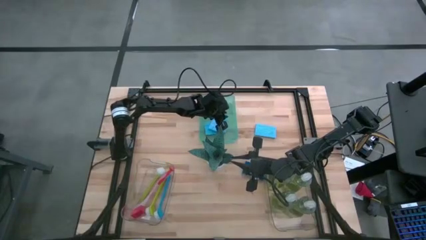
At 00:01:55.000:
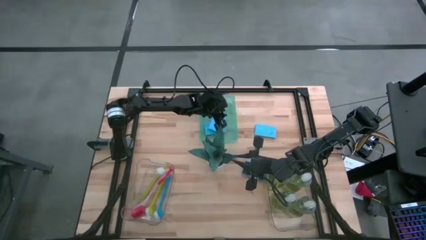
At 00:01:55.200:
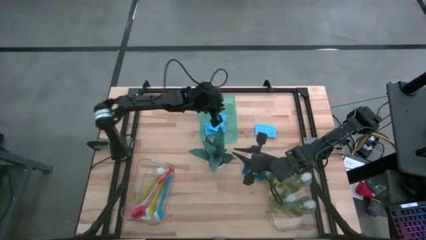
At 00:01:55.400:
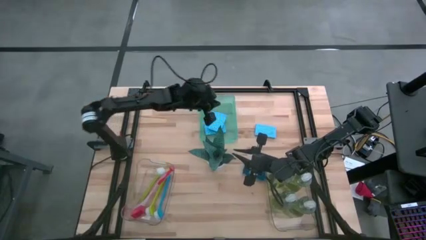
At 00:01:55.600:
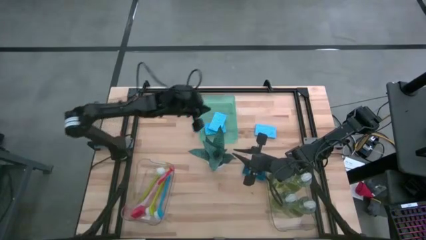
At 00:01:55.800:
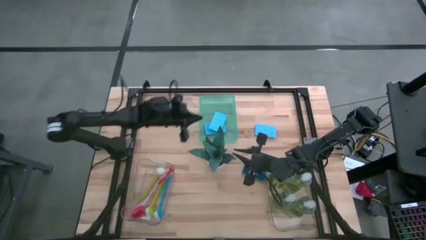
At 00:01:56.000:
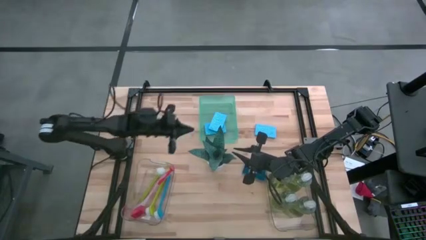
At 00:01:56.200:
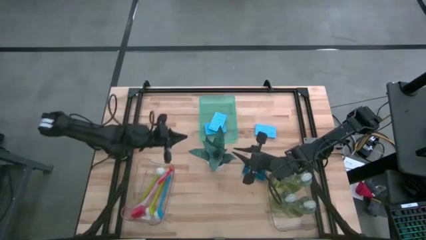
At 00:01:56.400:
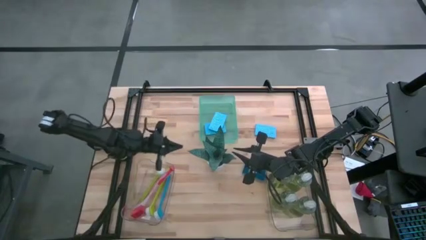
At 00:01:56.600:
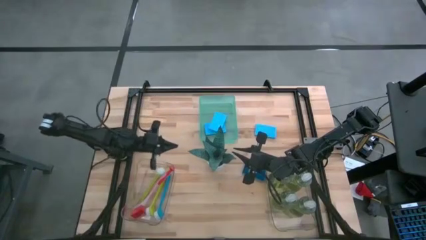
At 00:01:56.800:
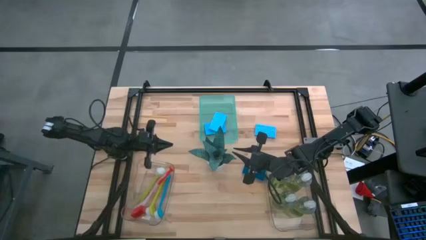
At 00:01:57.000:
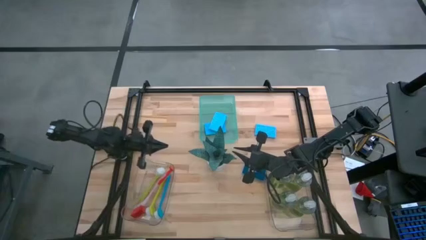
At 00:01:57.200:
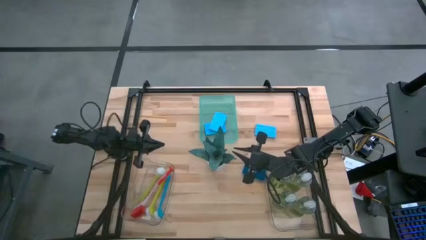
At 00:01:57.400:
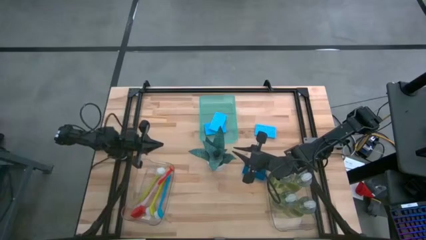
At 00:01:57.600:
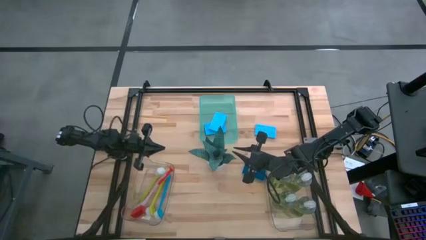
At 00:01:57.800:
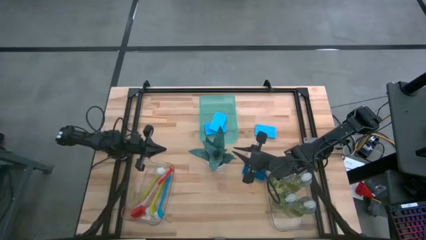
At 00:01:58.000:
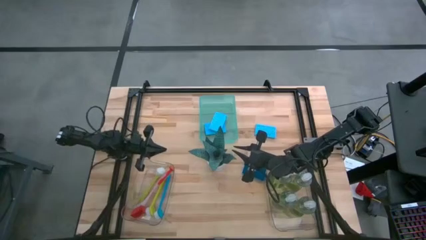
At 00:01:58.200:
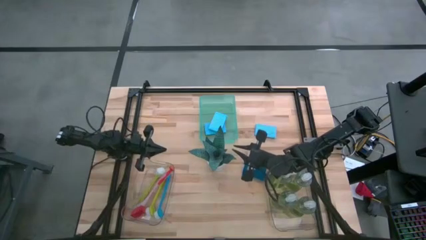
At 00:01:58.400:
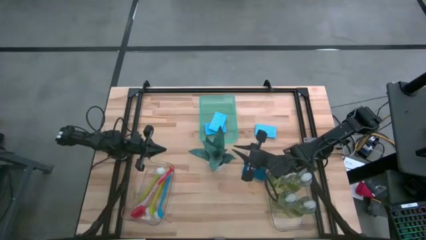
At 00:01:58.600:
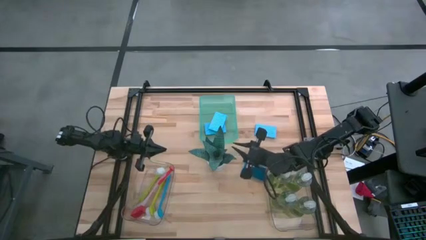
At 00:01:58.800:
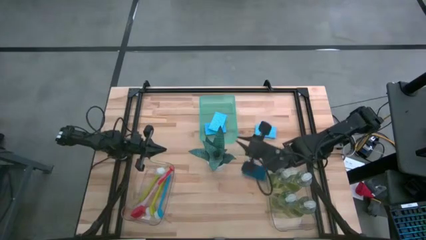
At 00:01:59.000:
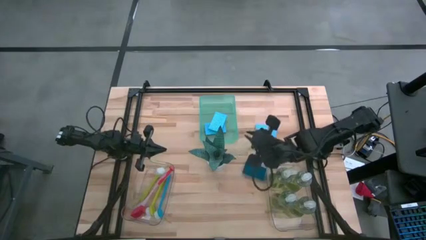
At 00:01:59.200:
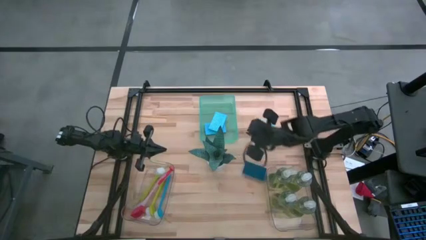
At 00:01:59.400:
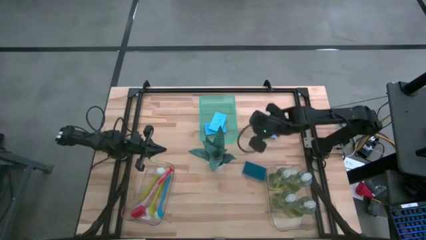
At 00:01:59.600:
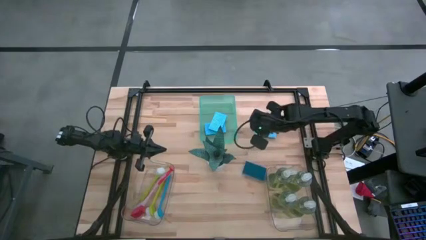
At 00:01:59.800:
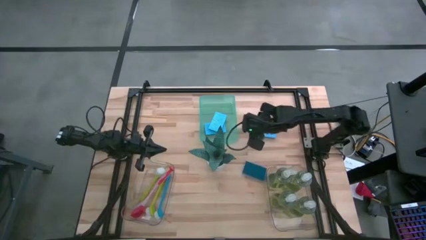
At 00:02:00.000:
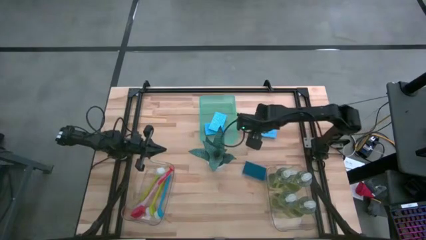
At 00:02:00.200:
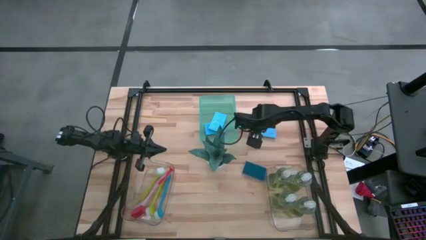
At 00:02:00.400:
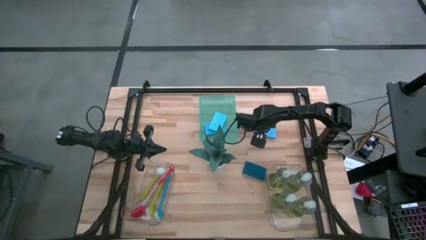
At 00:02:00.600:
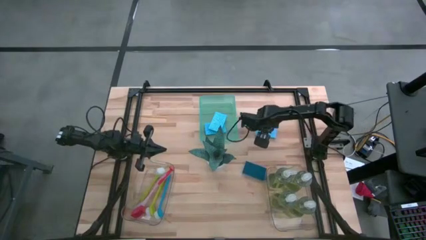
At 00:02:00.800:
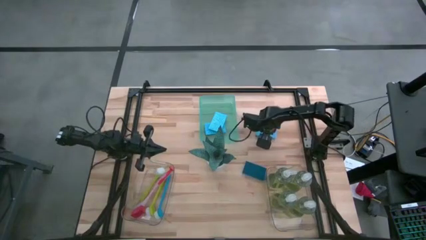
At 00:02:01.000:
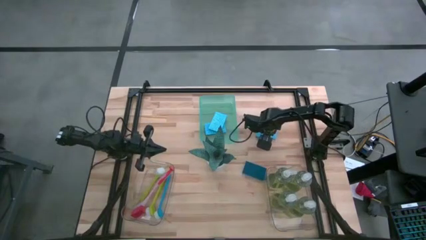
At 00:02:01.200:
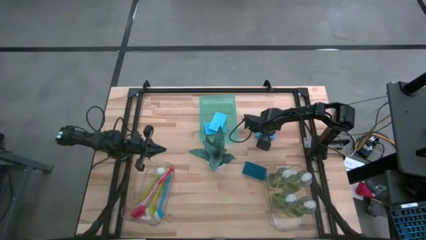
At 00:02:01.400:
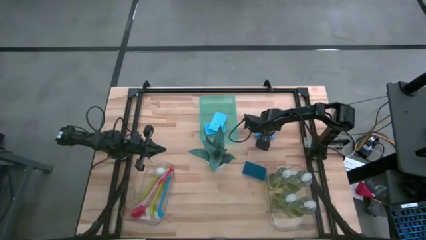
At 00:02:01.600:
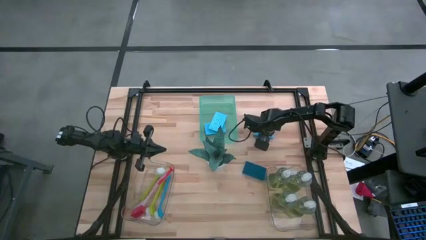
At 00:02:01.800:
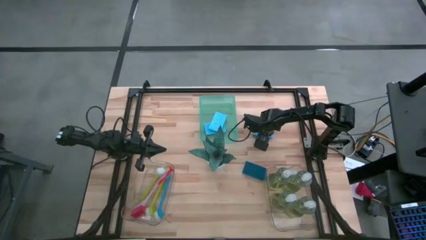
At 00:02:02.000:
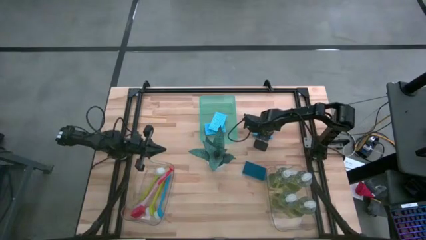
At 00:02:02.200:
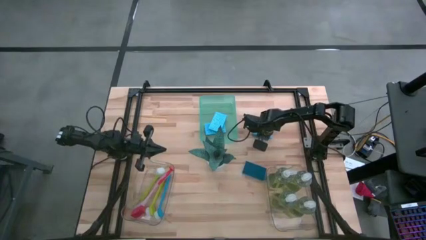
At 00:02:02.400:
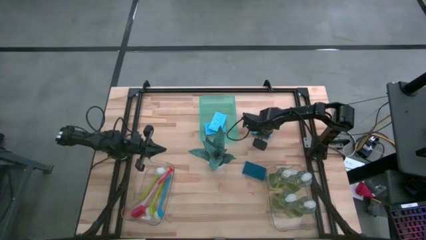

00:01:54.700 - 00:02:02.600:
Task: Pick & Place Kitchen Sink Supplies
Put the blue sponge into the green transparent bin

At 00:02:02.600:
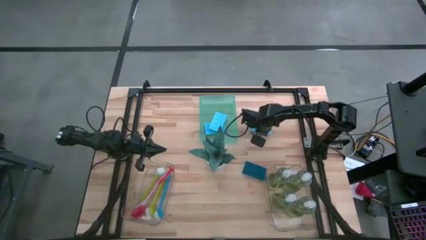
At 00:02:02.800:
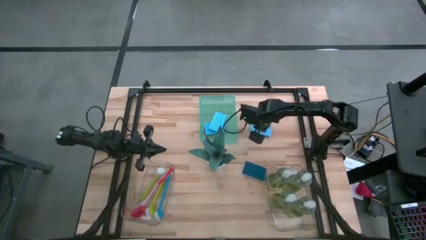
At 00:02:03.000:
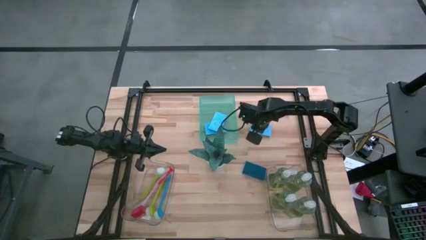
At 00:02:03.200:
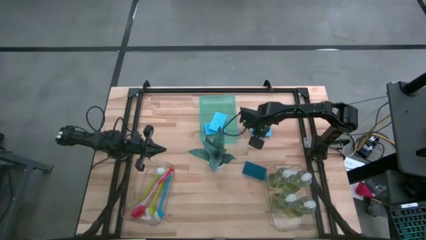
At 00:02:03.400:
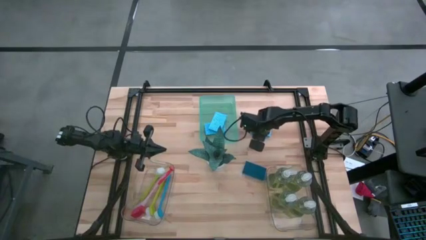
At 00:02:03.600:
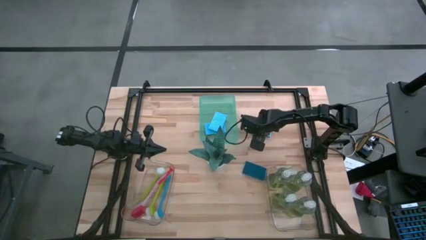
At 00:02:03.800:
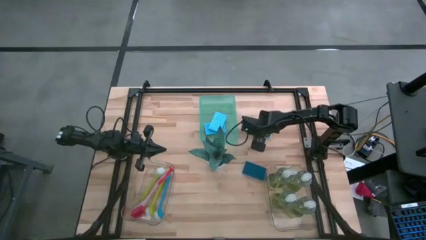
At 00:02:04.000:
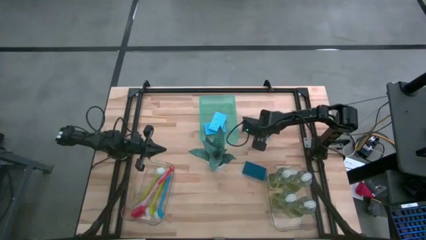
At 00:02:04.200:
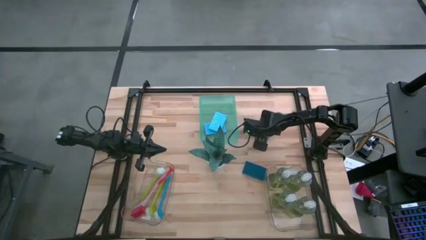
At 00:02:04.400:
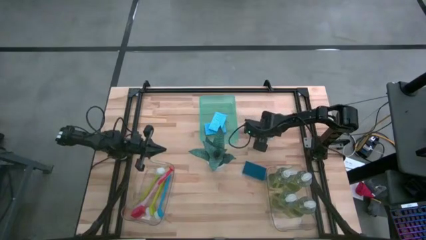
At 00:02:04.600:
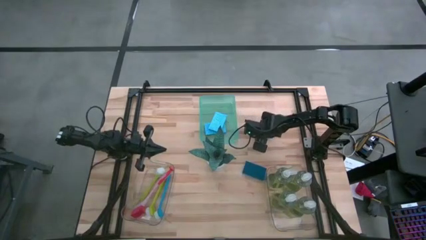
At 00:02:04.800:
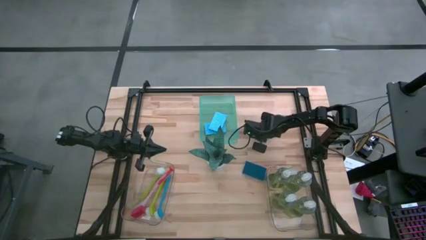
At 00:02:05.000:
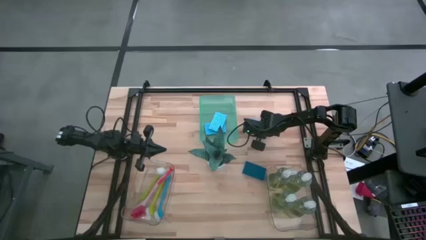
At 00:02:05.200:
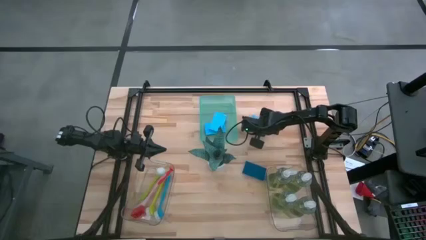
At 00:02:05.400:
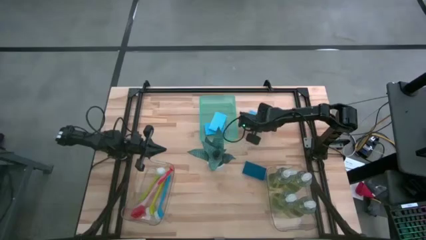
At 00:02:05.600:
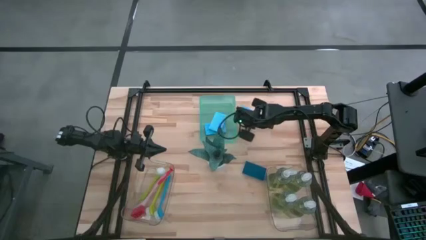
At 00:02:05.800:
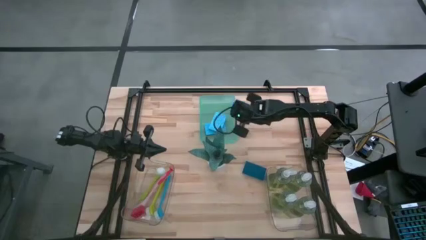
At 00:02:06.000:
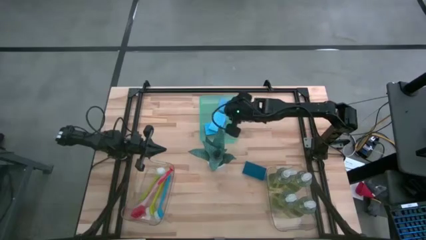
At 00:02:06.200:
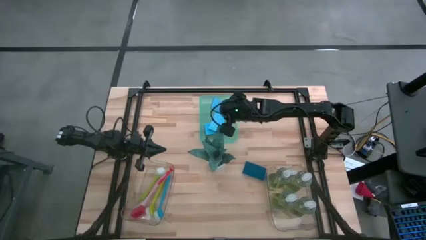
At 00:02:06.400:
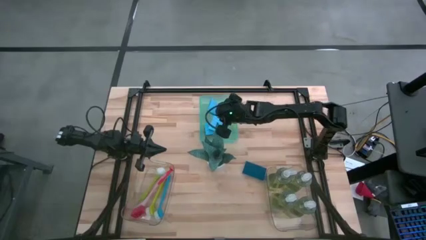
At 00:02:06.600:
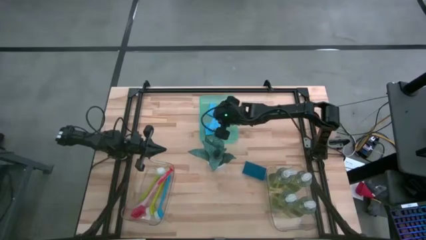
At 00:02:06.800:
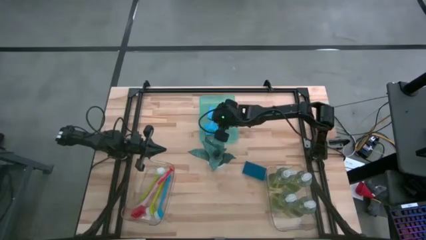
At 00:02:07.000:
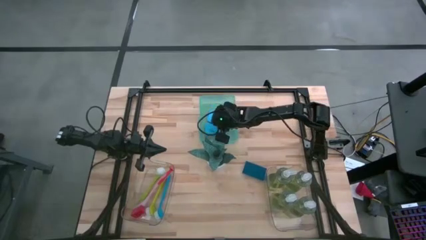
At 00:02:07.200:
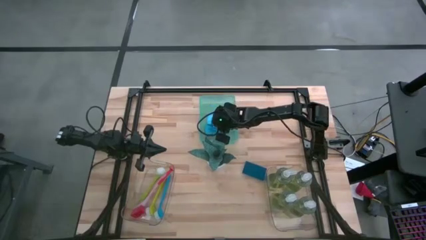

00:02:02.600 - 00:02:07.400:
Put the blue sponge into the green transparent bin

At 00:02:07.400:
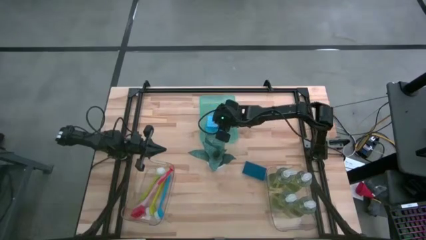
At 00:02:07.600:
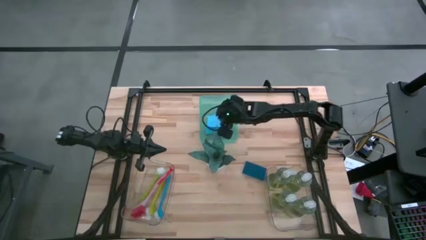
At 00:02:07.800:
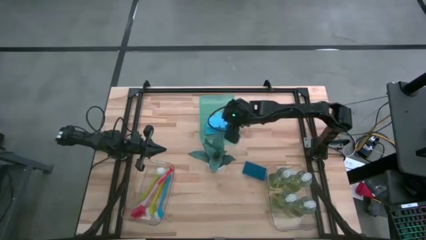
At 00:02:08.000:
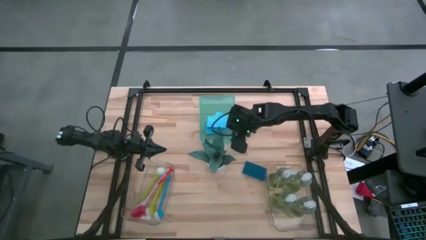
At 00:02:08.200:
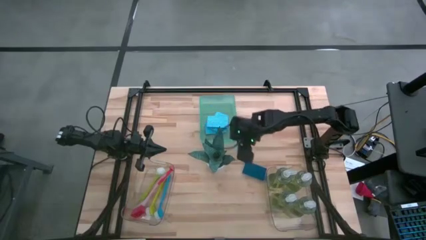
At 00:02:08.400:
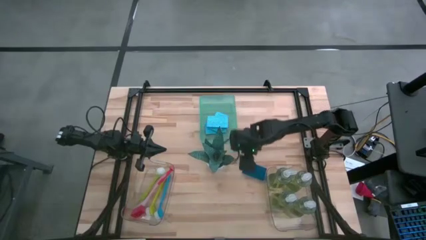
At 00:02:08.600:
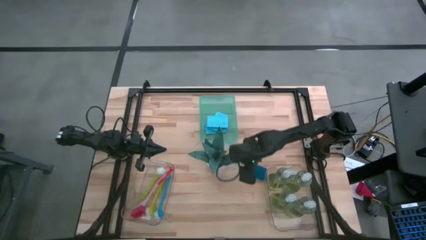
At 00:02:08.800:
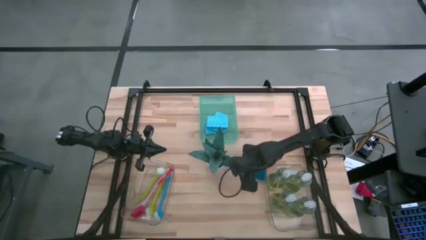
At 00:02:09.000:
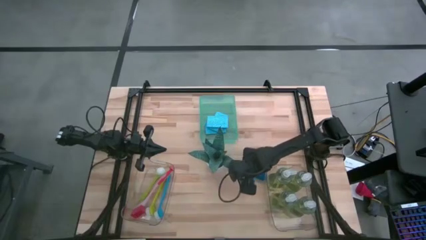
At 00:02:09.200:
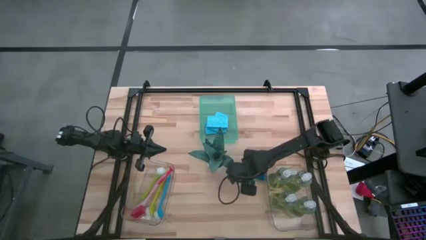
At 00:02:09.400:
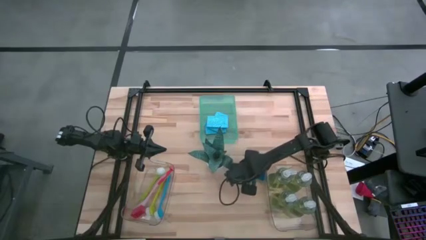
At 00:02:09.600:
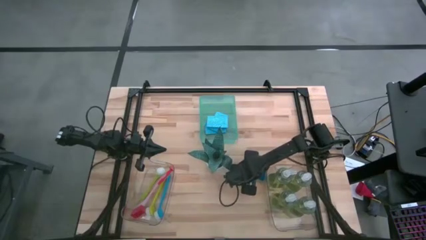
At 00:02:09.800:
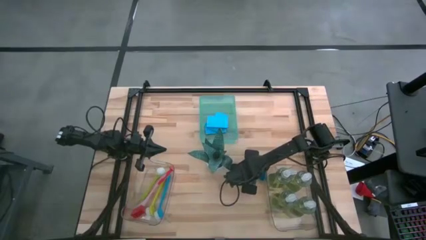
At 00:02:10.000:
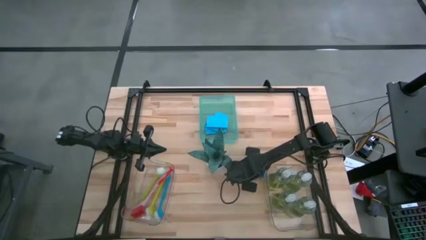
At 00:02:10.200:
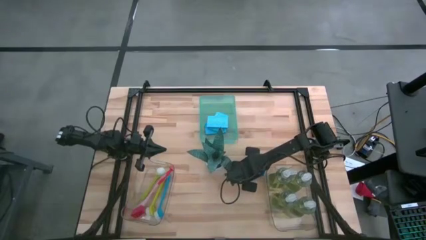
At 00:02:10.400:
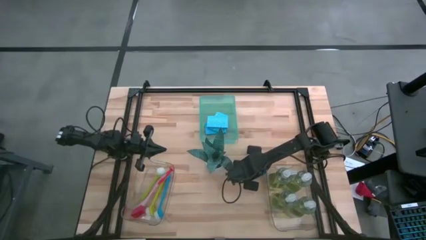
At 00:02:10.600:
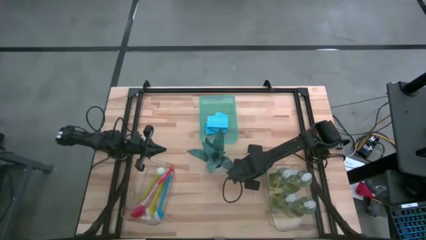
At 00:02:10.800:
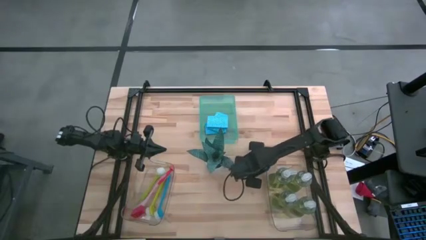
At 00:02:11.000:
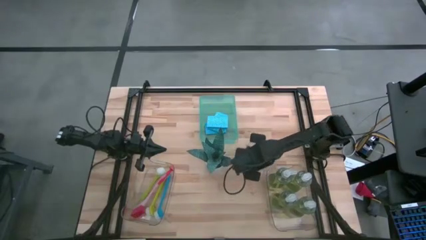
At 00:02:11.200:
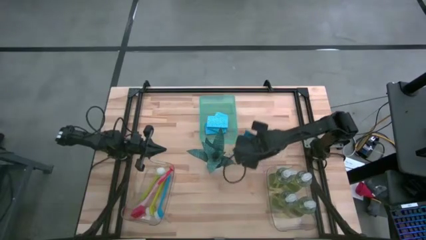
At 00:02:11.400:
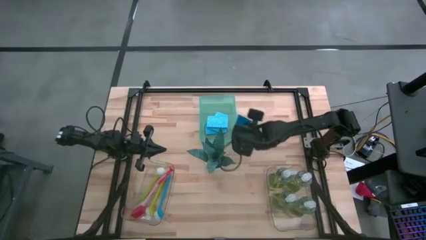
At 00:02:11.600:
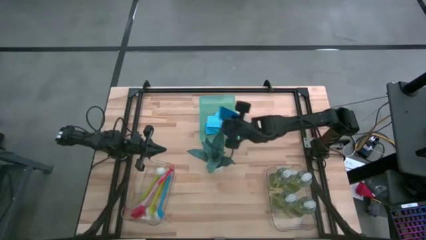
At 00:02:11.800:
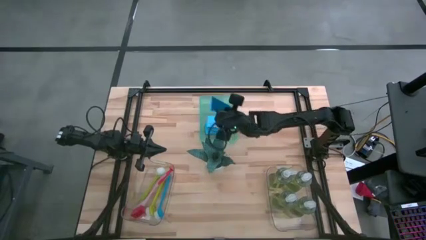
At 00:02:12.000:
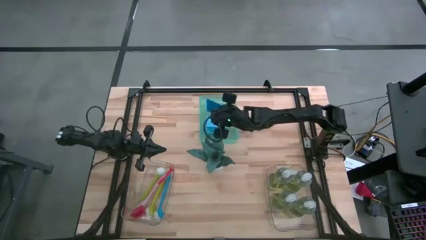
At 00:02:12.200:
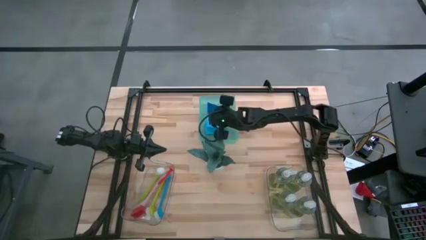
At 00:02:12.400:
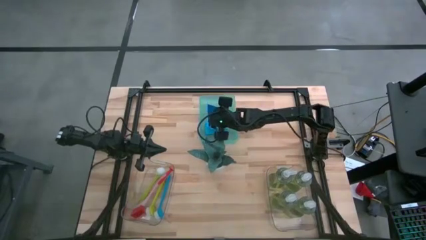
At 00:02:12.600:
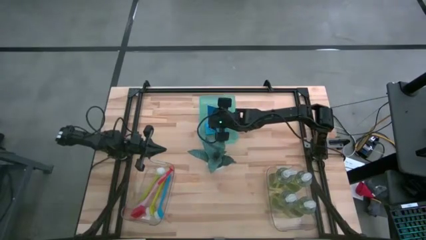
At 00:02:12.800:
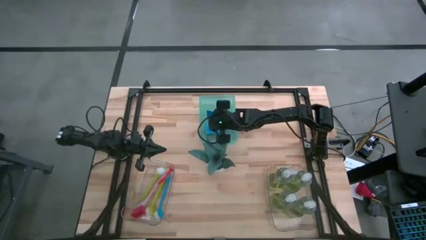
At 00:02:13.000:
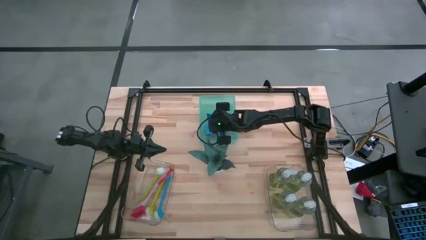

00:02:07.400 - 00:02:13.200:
Put the blue sponge into the green transparent bin
